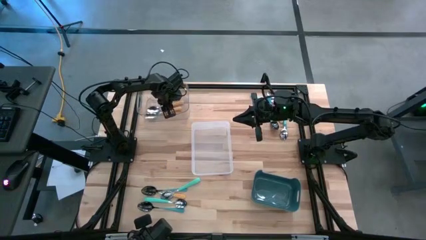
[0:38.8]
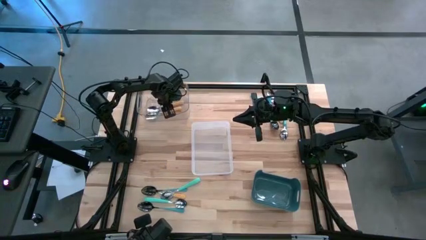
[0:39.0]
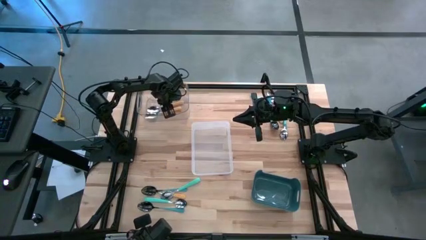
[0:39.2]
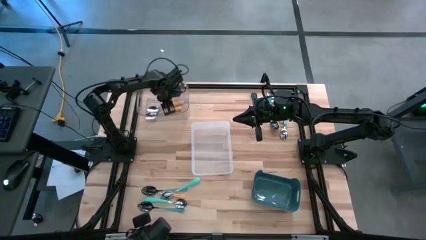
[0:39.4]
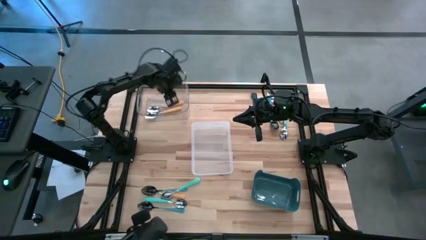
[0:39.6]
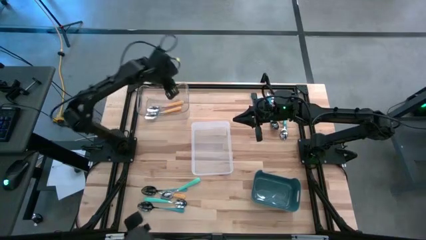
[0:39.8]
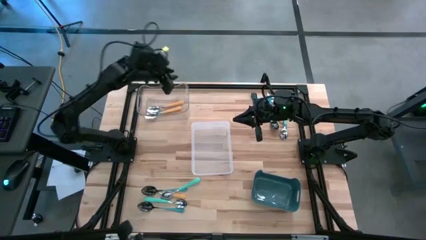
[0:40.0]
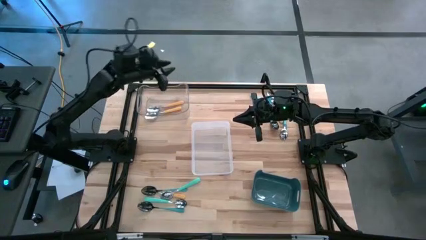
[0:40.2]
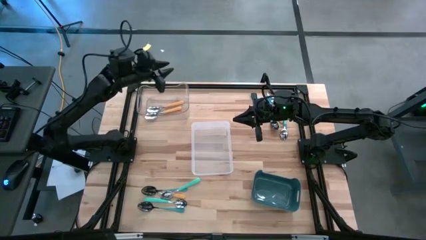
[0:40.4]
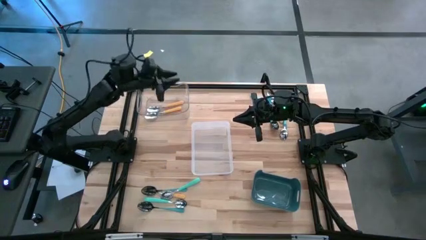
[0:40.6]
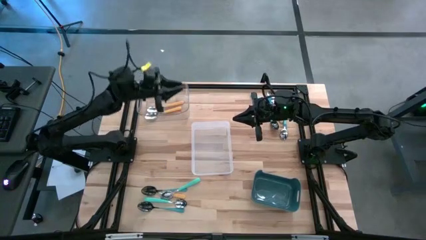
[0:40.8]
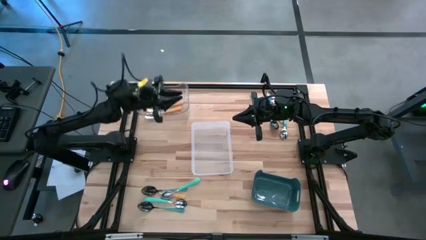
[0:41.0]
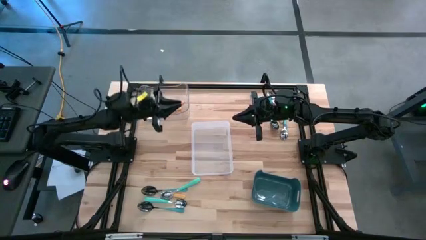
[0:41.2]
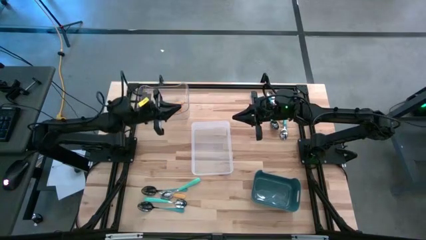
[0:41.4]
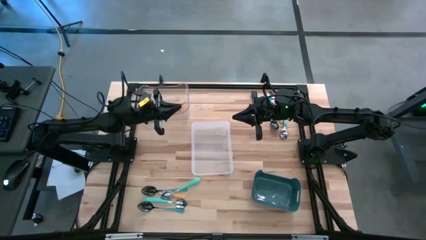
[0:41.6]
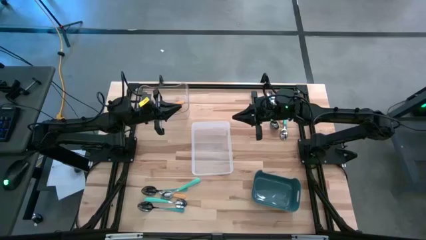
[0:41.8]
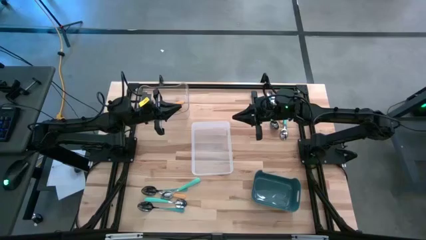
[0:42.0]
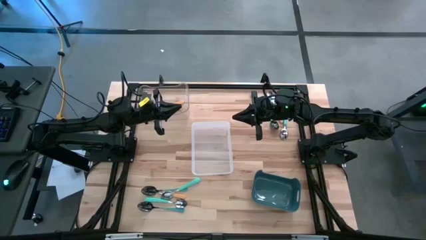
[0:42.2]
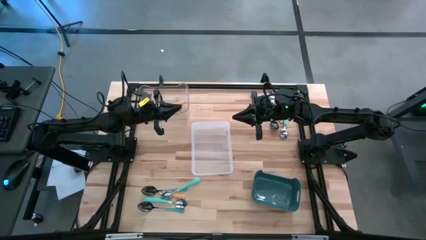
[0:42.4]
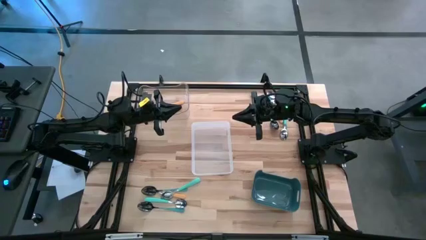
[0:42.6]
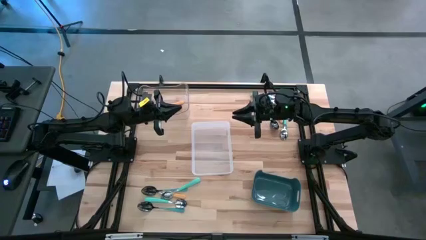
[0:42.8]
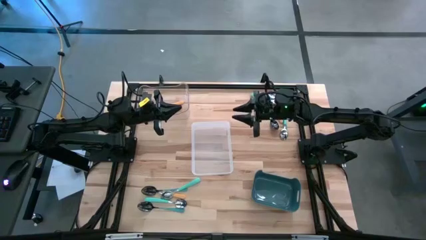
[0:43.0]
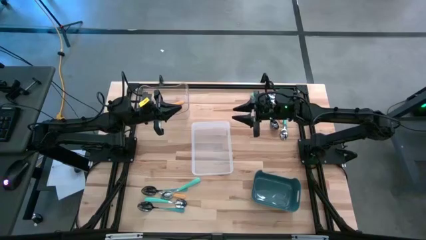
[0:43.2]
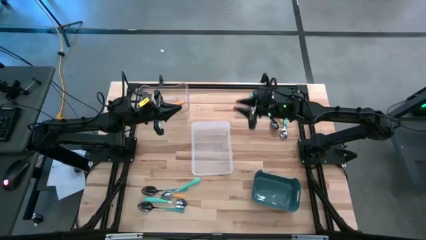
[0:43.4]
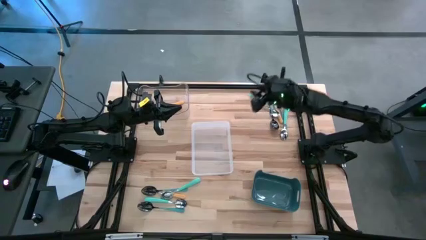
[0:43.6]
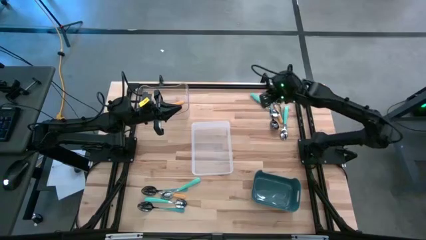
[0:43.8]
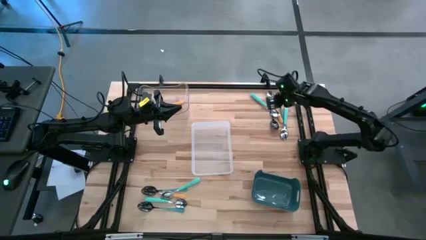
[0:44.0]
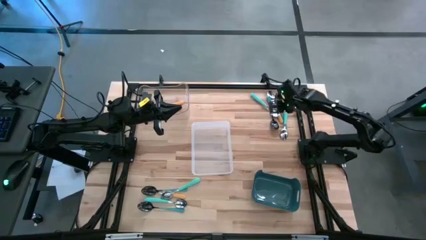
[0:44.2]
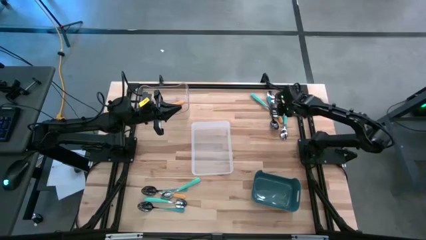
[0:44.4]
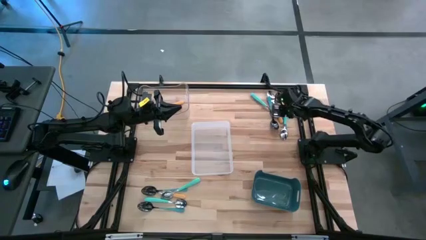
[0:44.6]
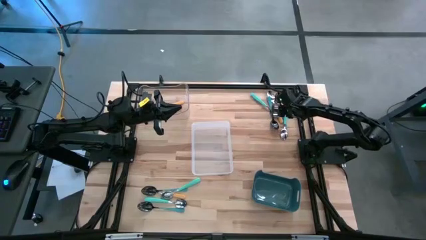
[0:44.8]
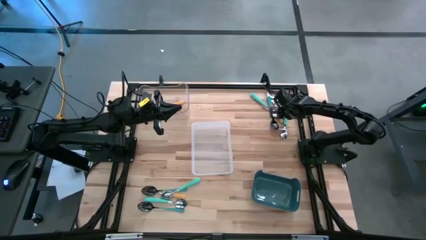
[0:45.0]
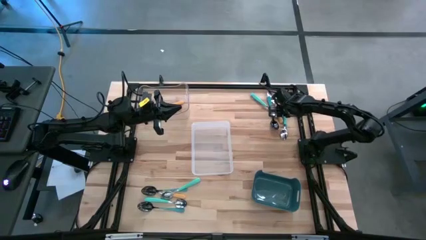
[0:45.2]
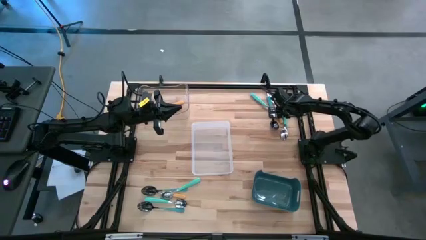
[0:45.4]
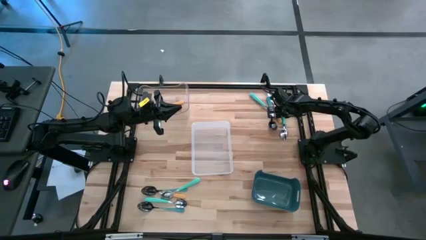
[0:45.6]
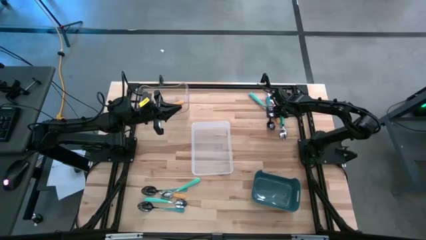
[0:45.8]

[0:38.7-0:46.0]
Task: Sort silverware by color (type)
Adjust the blue spoons on the table
